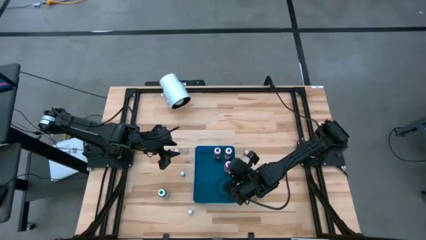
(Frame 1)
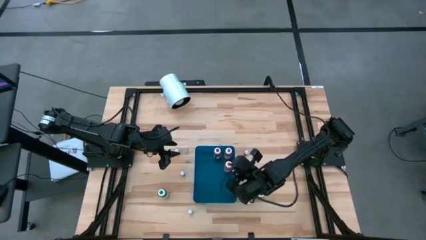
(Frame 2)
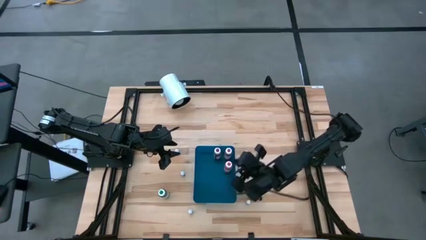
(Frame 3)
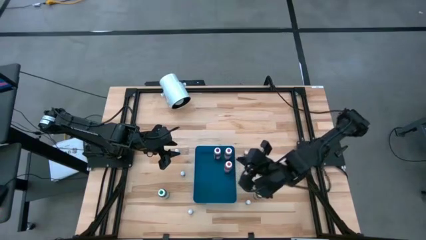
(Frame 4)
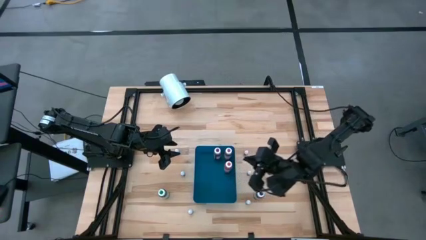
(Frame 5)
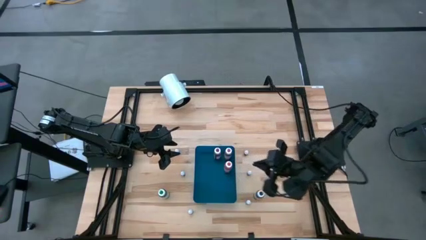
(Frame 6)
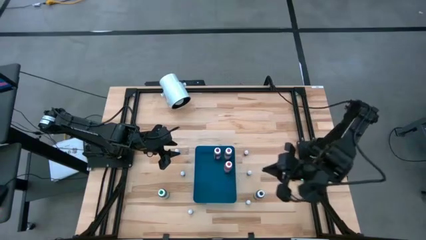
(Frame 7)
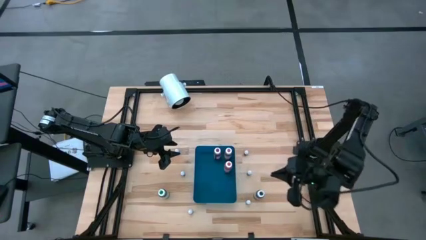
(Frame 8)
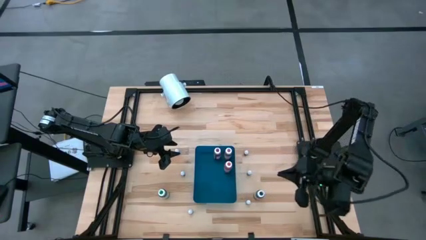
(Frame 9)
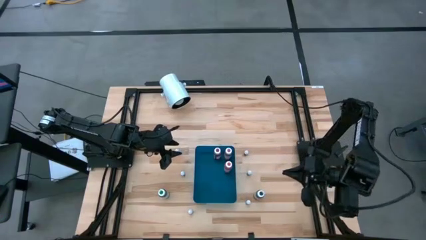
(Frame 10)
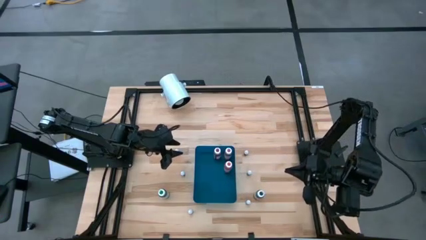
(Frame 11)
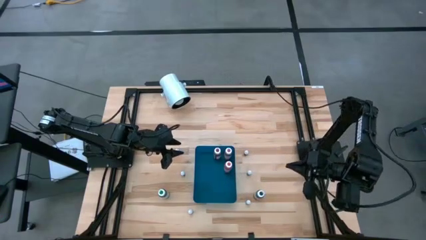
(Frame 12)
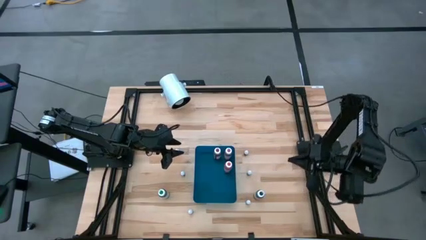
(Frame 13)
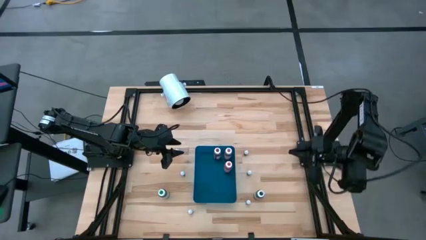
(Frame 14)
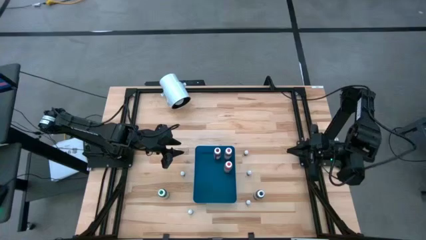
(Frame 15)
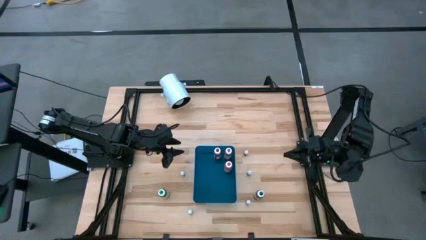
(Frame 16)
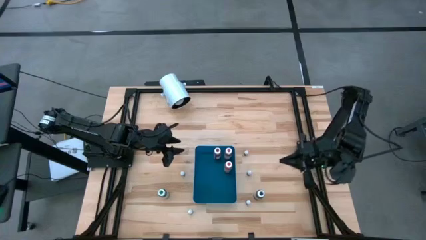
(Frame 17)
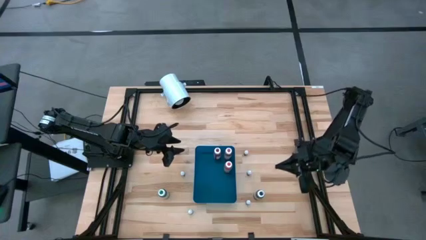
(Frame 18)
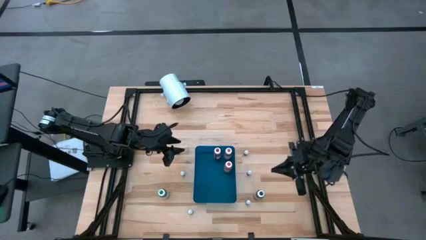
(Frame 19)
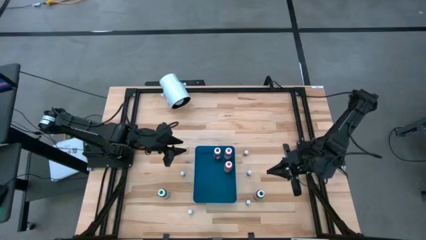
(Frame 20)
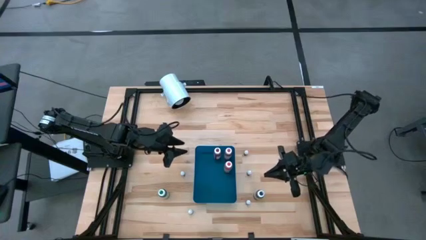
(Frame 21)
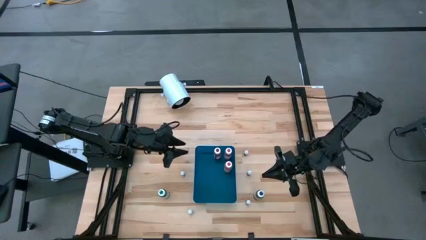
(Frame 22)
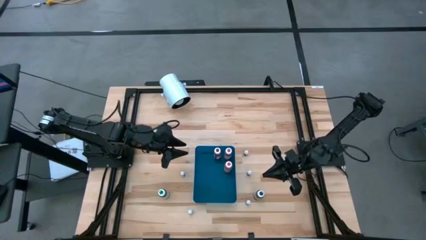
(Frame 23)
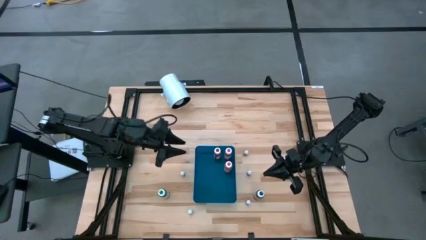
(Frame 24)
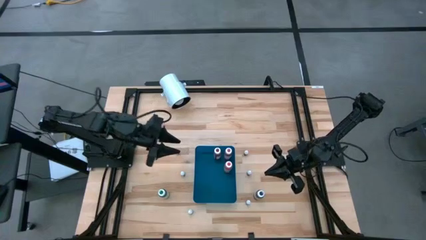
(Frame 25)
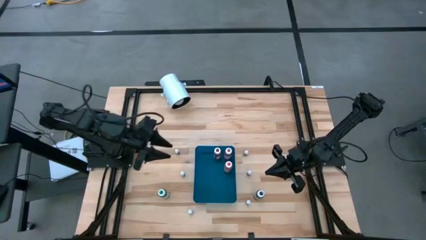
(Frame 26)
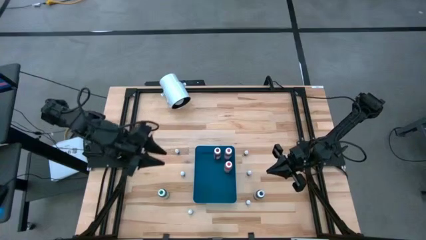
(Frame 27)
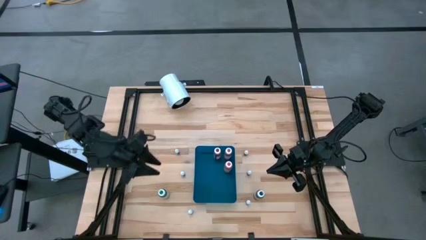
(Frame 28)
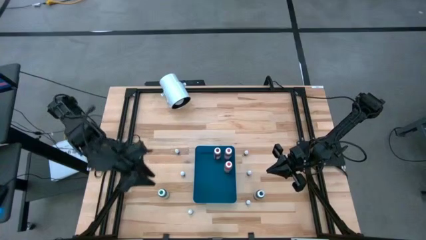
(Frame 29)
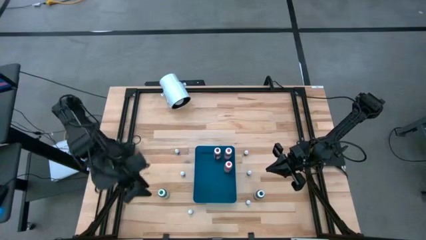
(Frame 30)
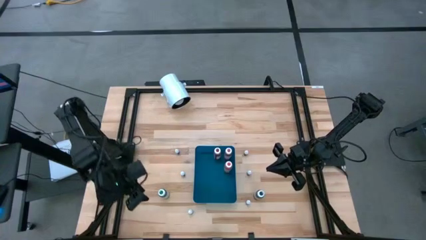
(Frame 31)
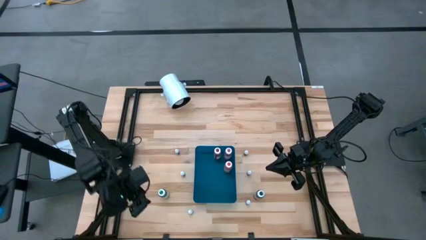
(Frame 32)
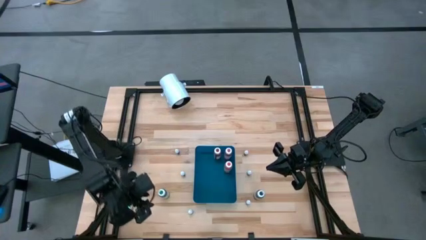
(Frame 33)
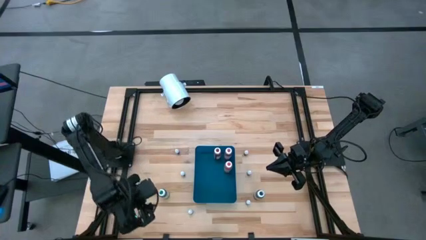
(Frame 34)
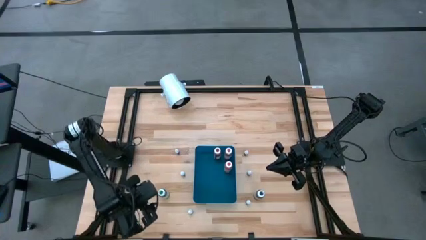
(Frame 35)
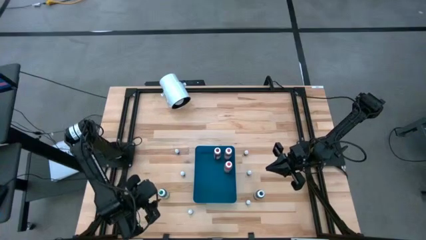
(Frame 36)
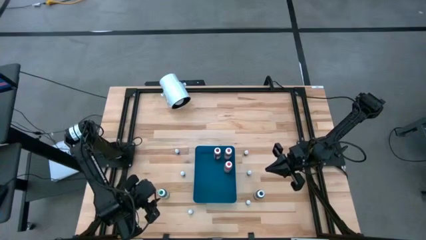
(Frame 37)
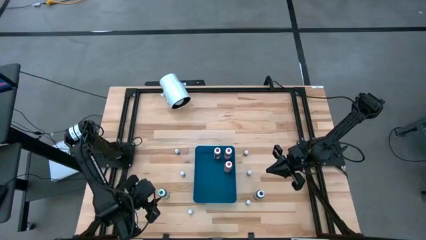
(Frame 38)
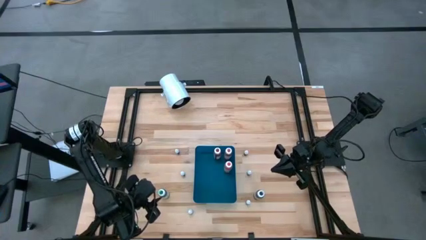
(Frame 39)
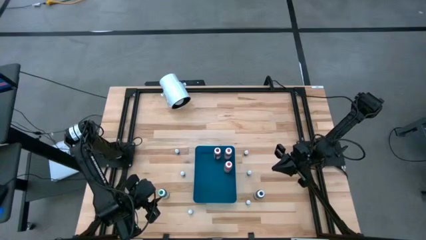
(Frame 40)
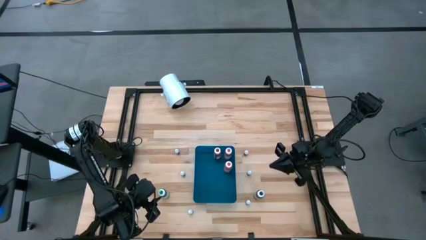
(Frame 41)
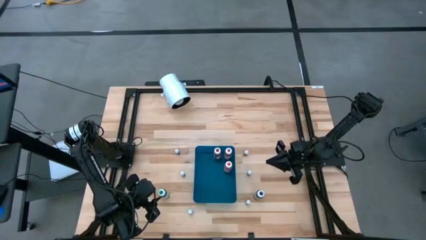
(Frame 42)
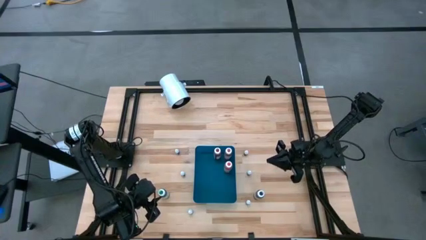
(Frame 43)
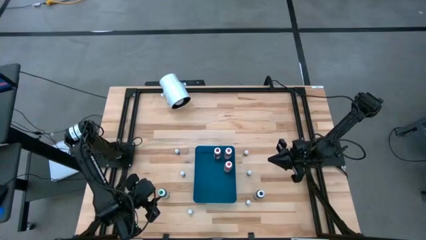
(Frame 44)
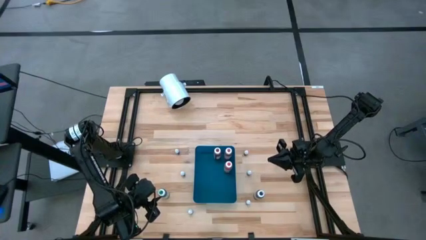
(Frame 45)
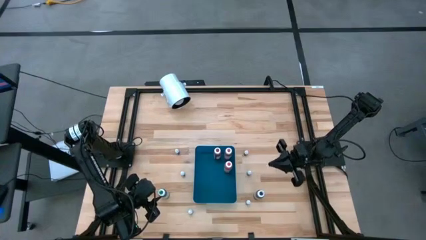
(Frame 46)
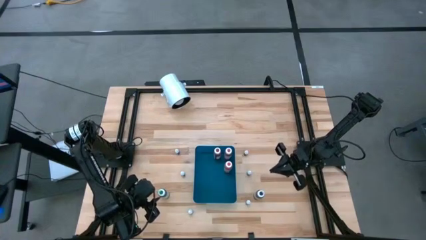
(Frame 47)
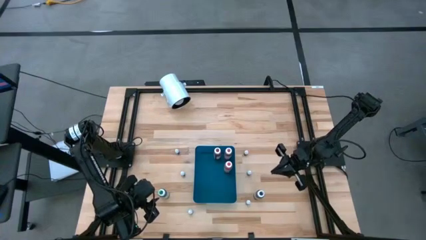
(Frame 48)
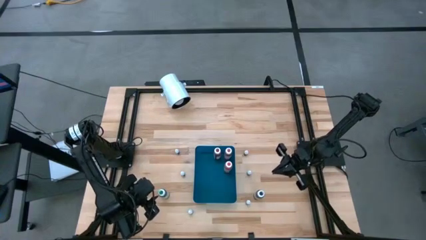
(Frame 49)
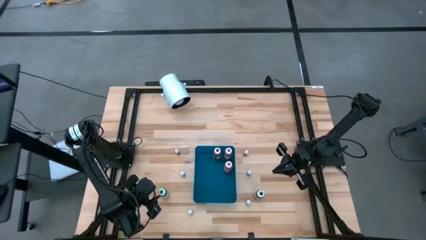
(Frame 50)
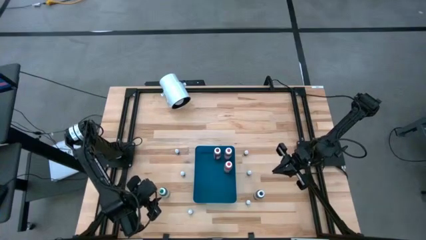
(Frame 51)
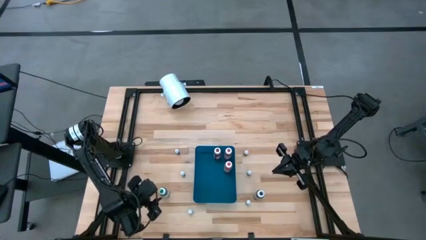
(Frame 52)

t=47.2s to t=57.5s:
Task: Pick & Place food coloring
Put the big green food coloring bottle into the blue container

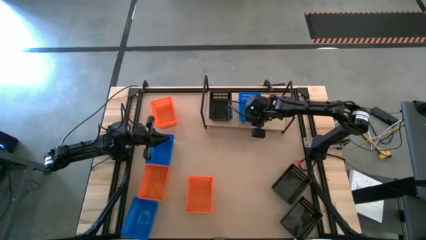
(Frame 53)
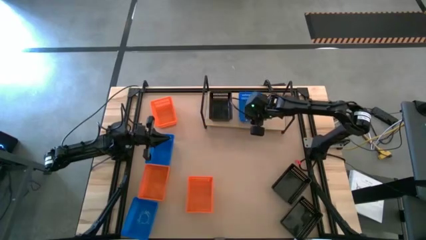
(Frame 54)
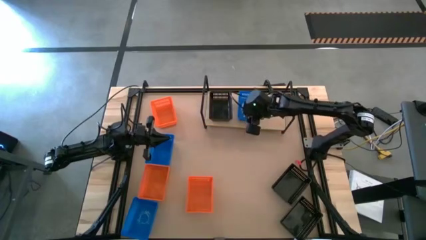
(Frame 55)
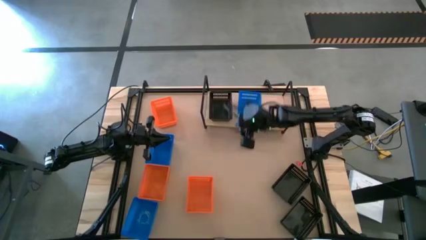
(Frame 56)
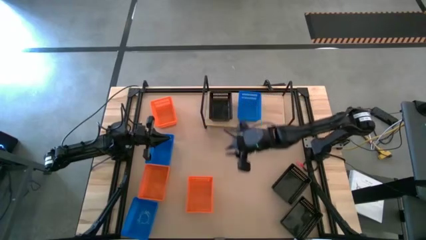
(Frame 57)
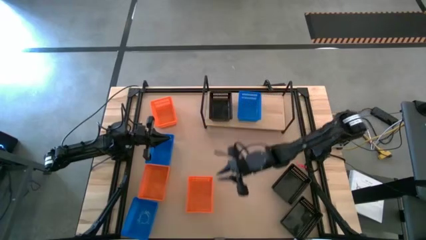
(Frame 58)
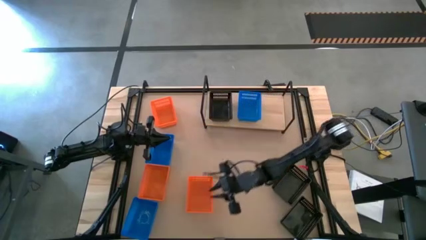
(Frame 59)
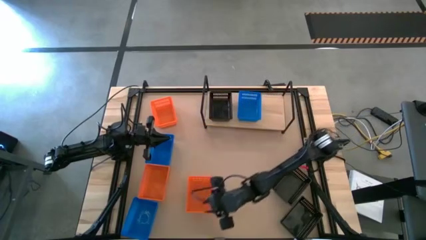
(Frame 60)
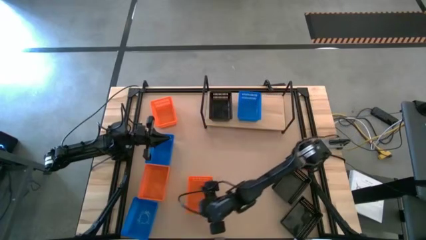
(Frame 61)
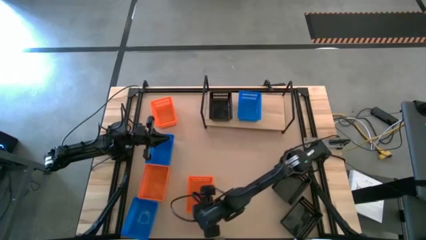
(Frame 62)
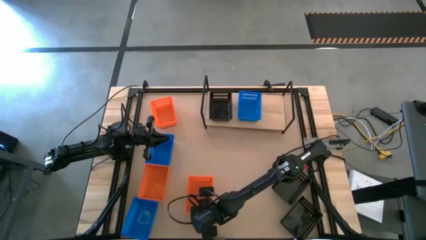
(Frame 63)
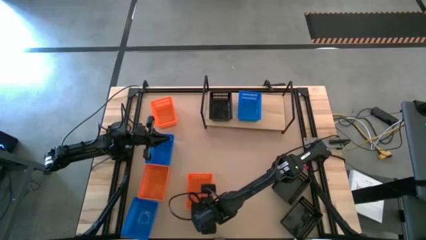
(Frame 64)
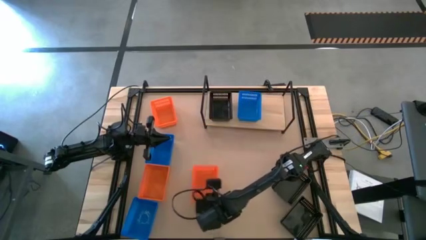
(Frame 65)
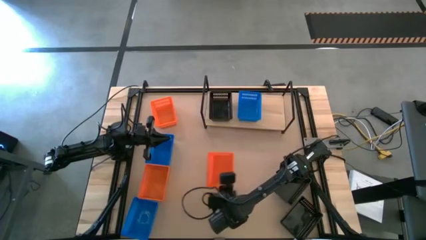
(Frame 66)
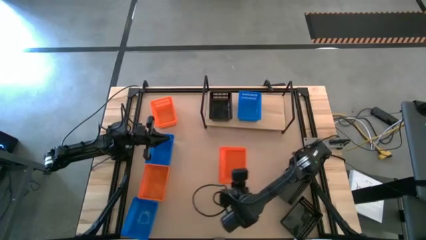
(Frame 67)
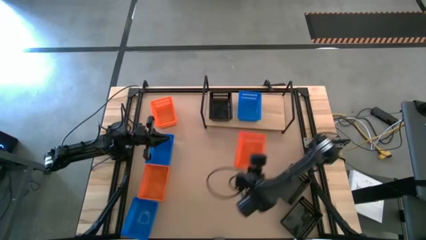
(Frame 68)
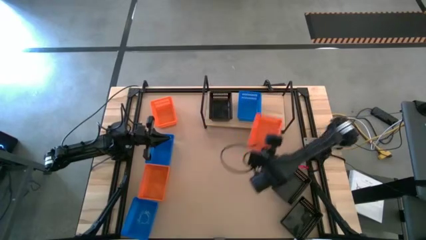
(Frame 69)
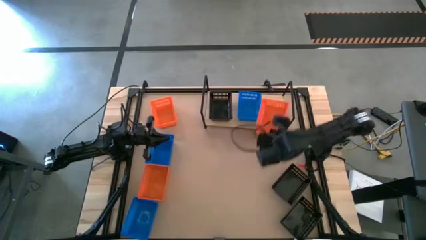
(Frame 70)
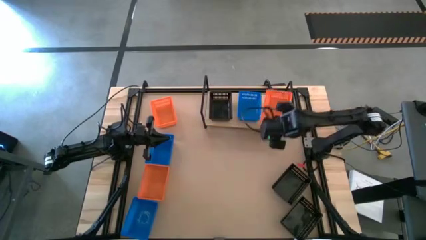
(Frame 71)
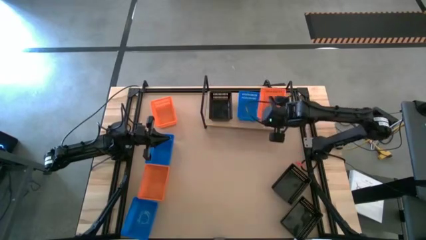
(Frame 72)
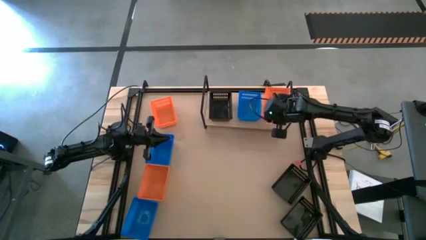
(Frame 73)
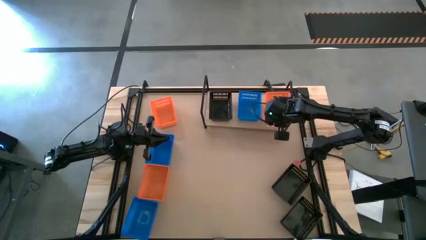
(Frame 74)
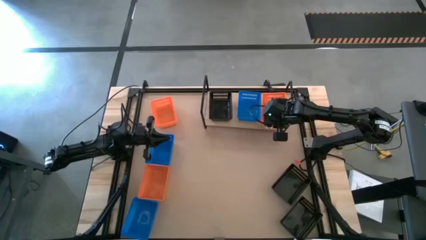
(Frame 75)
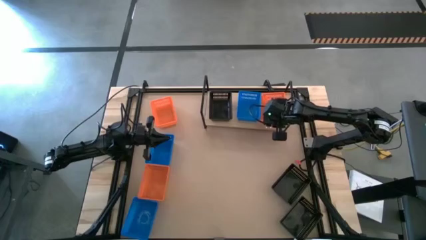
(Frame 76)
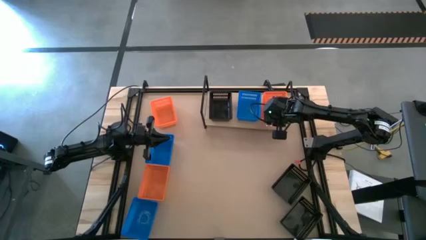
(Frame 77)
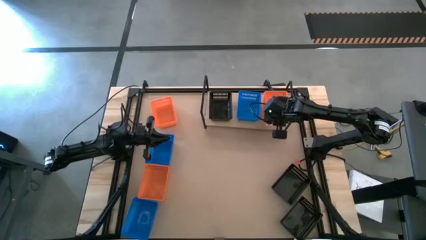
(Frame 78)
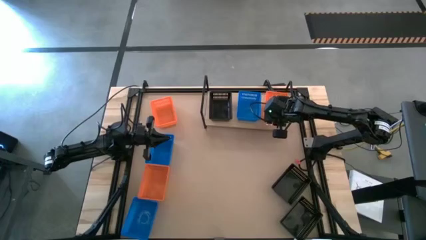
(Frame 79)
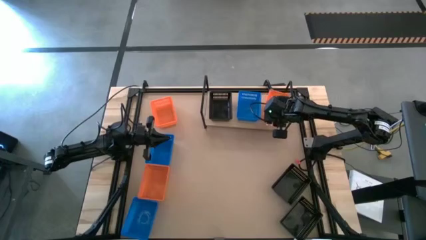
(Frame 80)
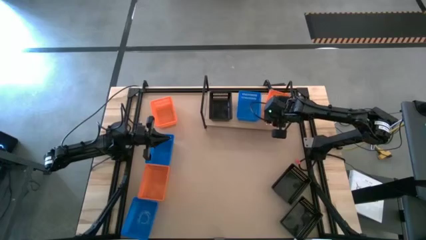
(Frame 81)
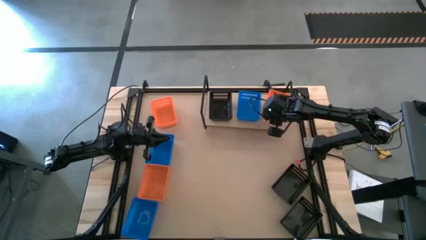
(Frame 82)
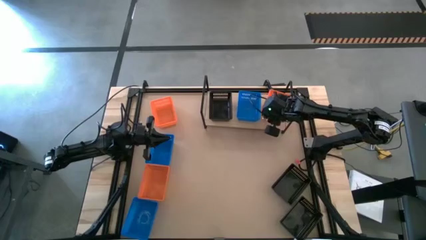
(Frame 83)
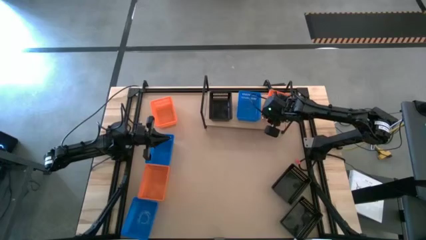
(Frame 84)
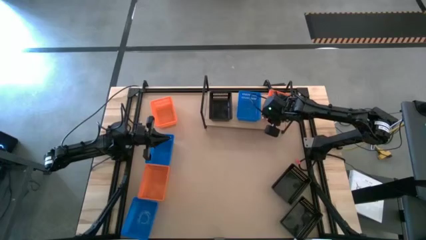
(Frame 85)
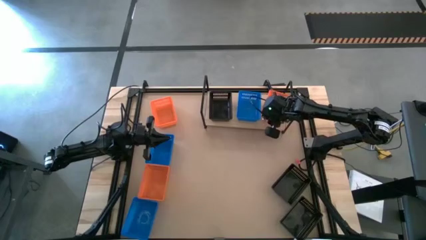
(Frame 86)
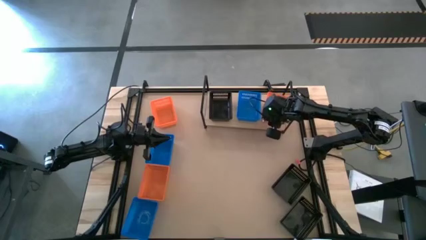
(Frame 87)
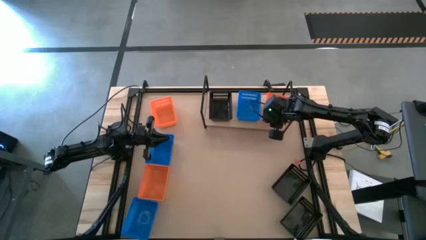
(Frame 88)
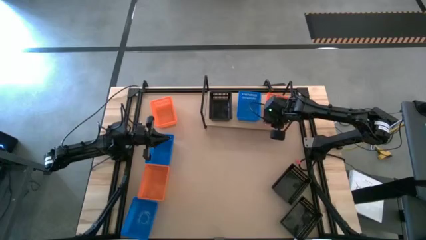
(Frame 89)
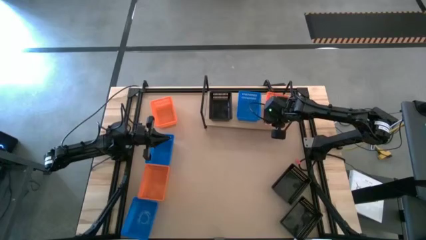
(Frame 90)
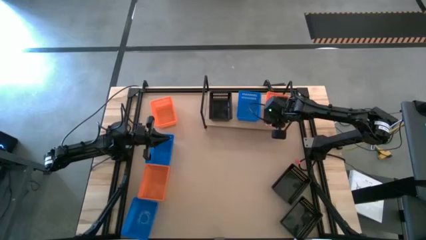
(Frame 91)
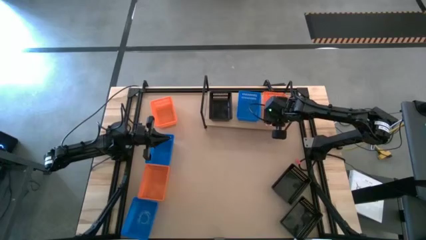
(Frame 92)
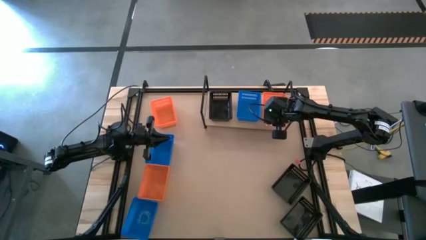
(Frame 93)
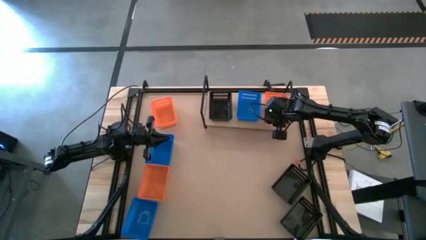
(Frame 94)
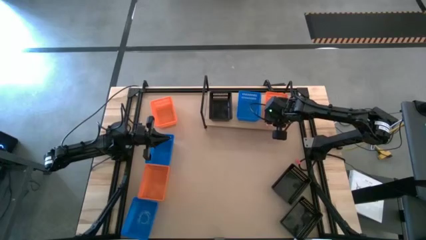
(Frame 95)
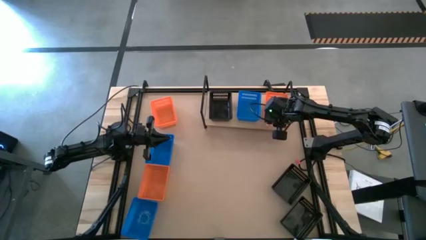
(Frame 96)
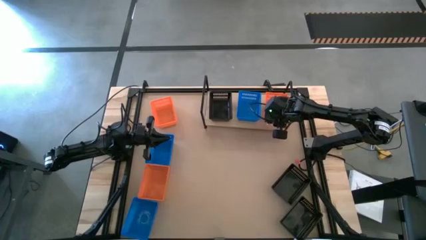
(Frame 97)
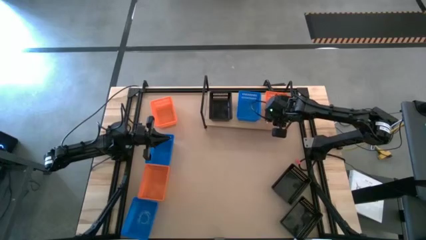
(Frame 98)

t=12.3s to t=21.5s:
Task: Stack baskets on shelf by color
Put the bottom right orange basket on the shelf
